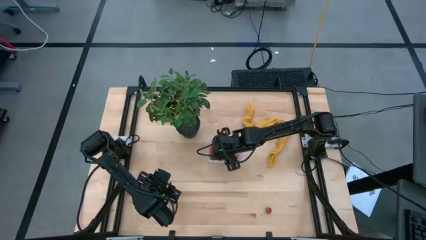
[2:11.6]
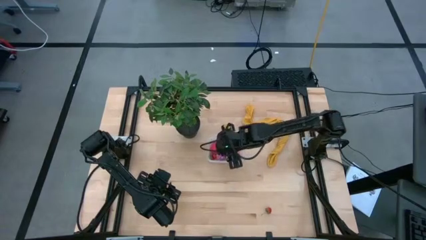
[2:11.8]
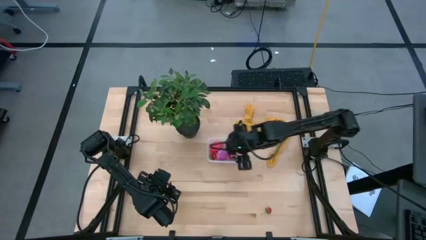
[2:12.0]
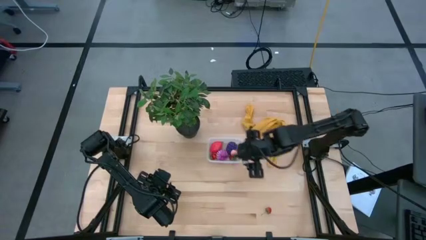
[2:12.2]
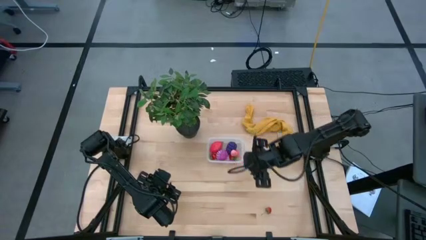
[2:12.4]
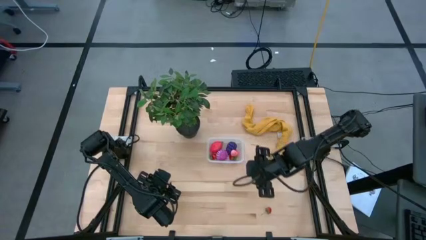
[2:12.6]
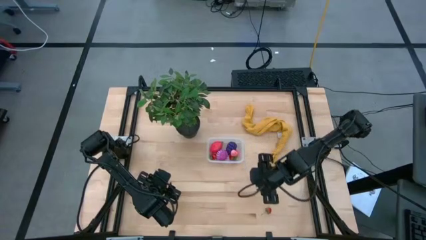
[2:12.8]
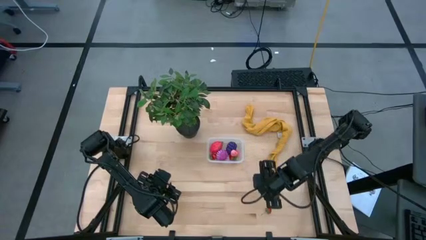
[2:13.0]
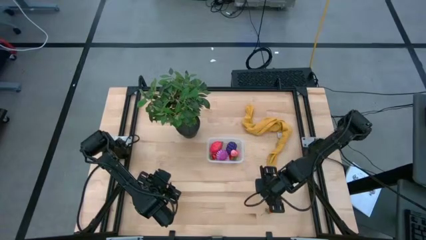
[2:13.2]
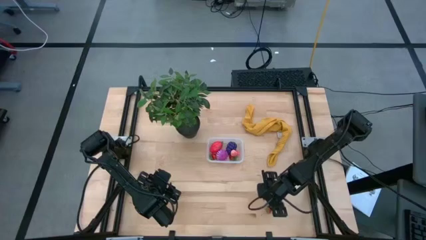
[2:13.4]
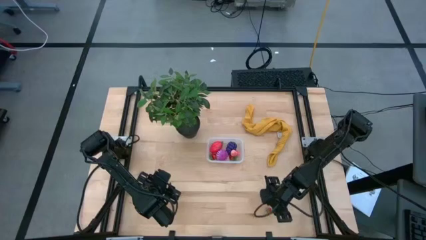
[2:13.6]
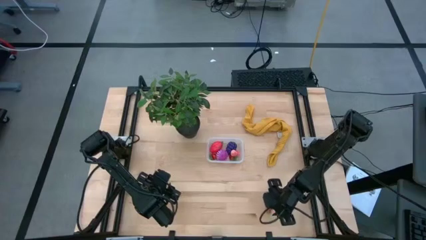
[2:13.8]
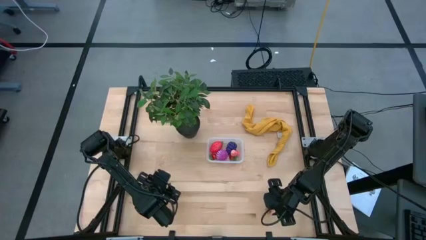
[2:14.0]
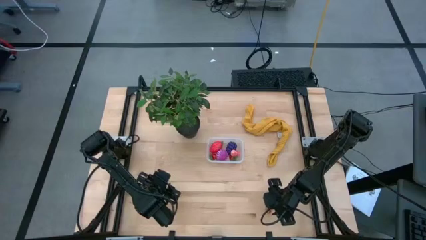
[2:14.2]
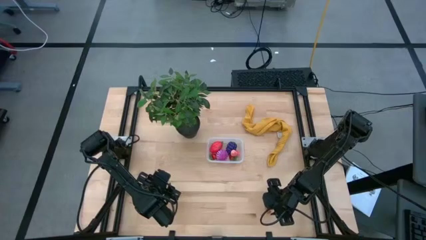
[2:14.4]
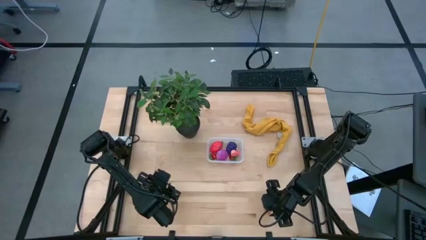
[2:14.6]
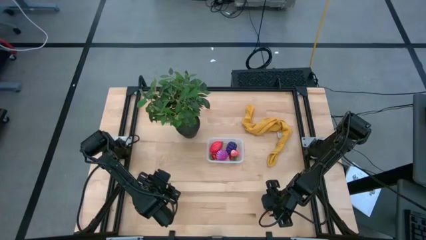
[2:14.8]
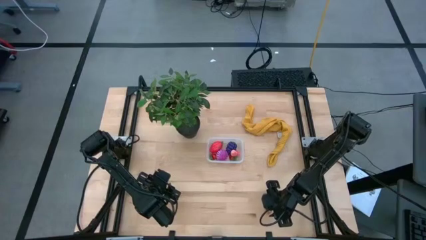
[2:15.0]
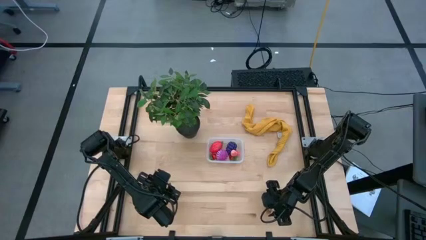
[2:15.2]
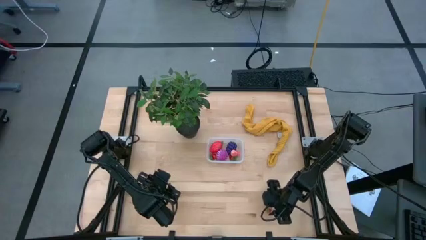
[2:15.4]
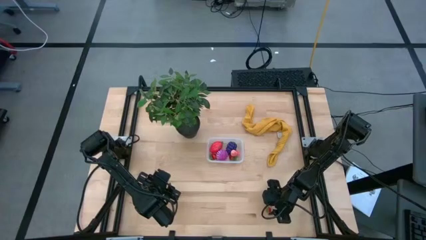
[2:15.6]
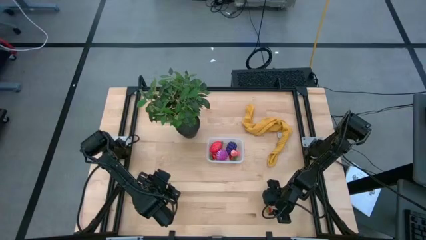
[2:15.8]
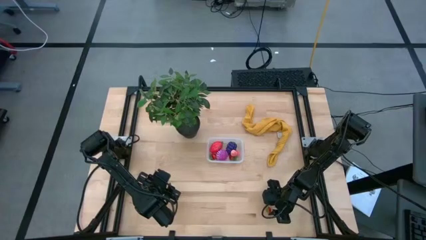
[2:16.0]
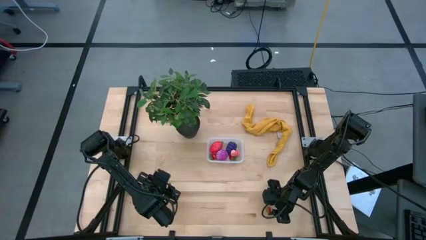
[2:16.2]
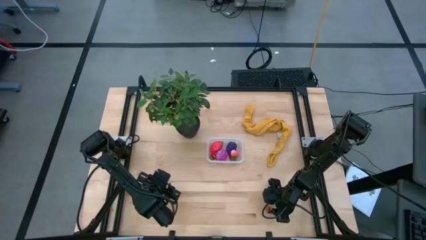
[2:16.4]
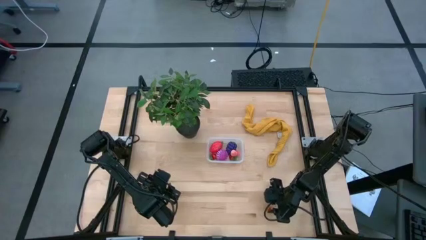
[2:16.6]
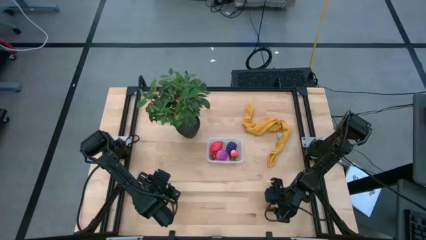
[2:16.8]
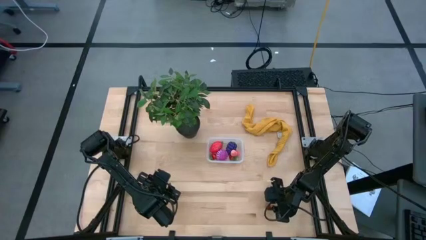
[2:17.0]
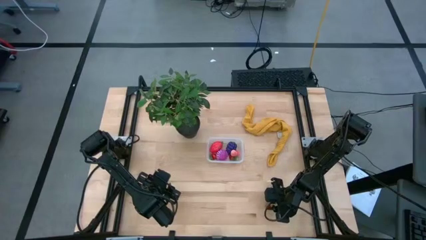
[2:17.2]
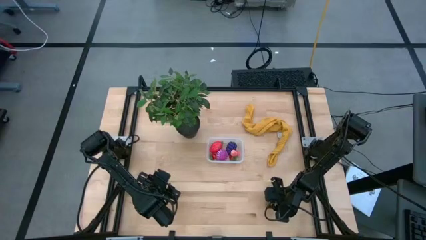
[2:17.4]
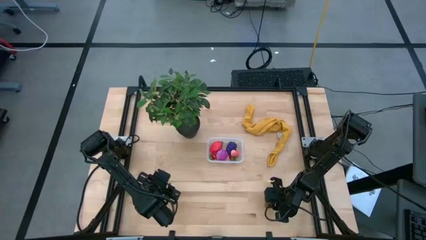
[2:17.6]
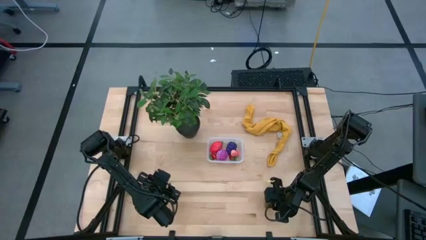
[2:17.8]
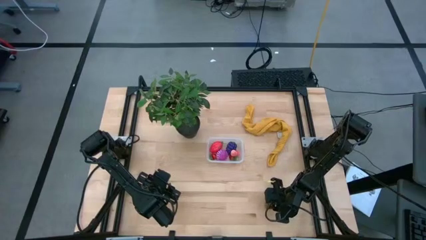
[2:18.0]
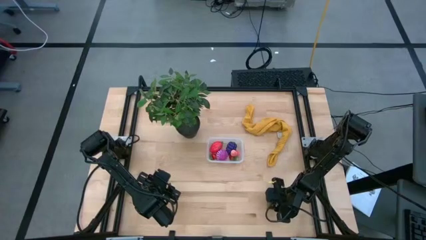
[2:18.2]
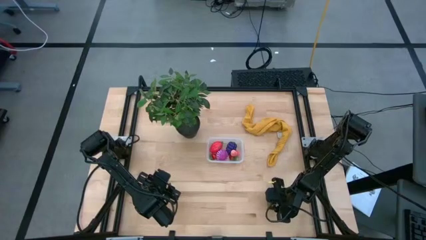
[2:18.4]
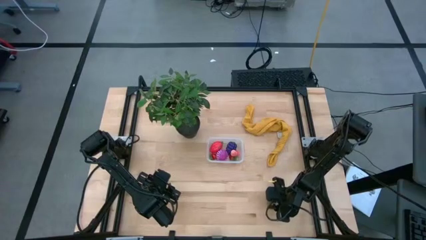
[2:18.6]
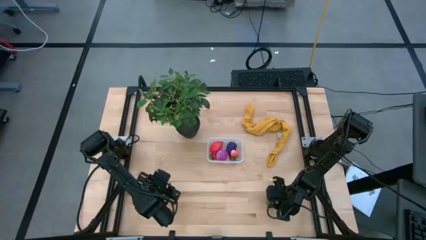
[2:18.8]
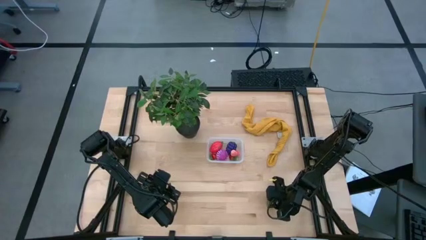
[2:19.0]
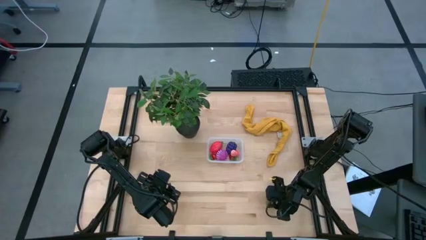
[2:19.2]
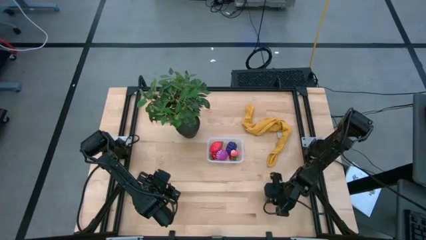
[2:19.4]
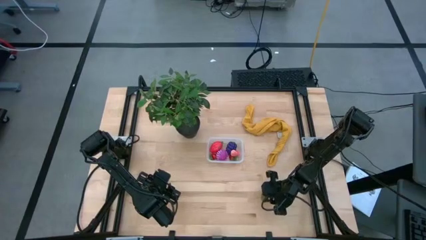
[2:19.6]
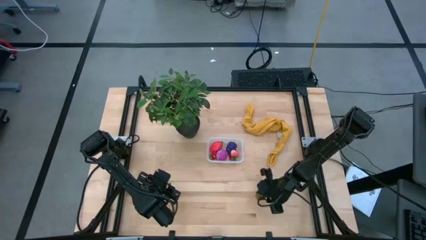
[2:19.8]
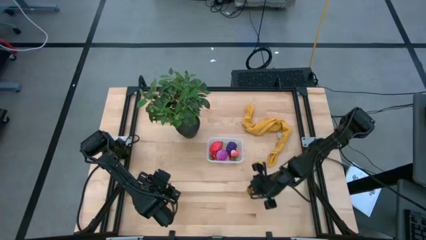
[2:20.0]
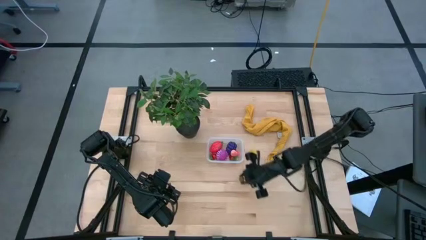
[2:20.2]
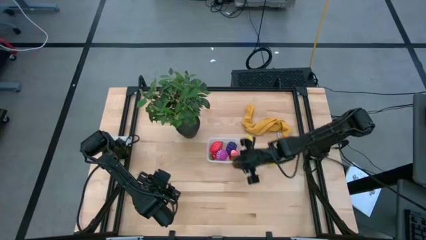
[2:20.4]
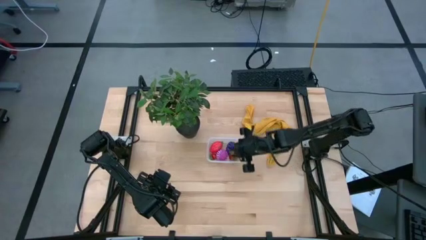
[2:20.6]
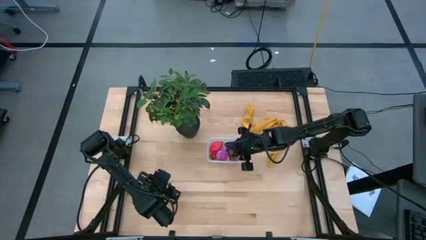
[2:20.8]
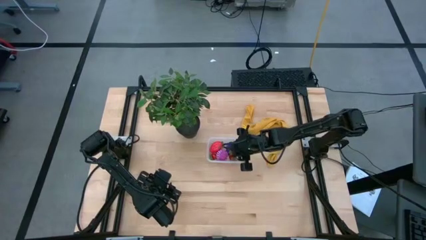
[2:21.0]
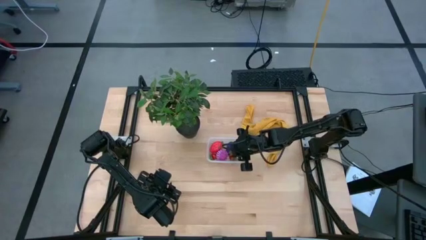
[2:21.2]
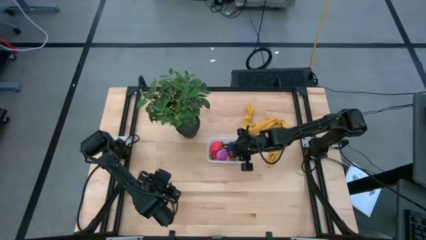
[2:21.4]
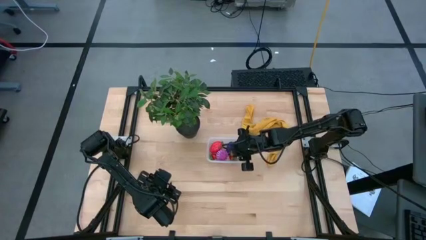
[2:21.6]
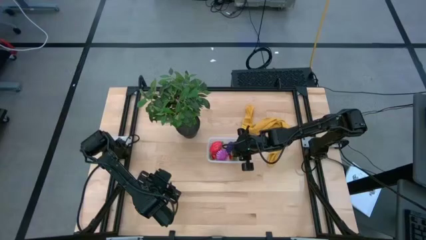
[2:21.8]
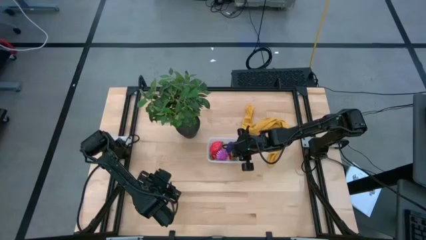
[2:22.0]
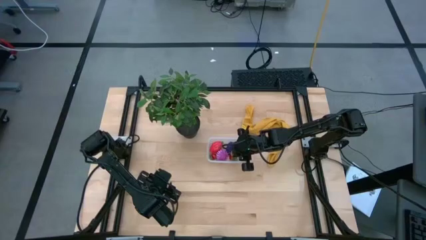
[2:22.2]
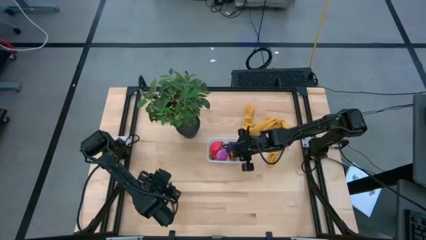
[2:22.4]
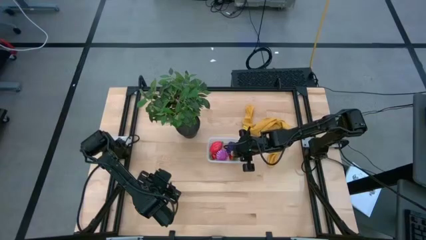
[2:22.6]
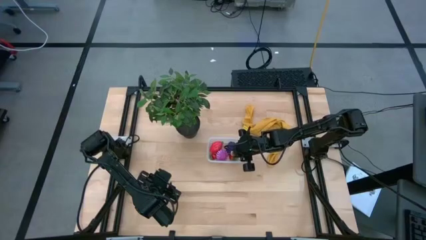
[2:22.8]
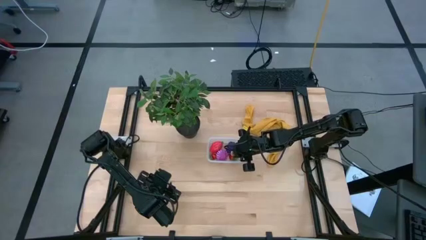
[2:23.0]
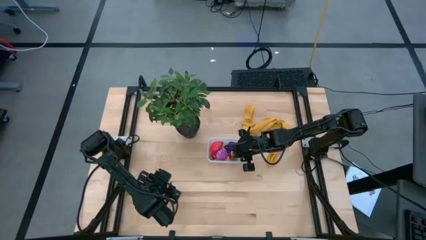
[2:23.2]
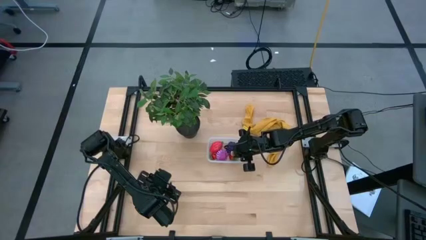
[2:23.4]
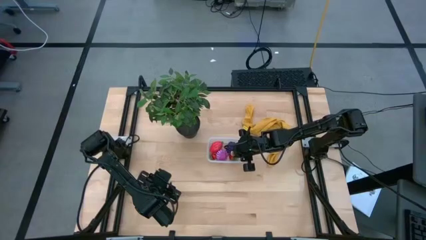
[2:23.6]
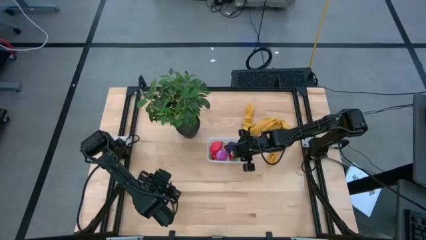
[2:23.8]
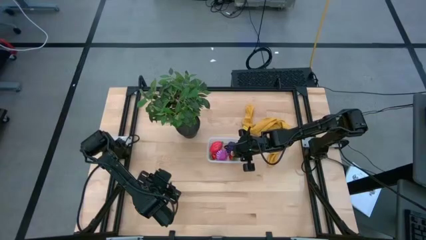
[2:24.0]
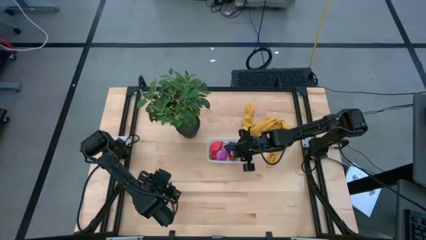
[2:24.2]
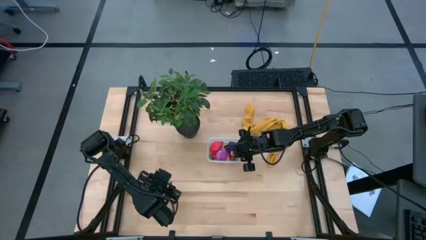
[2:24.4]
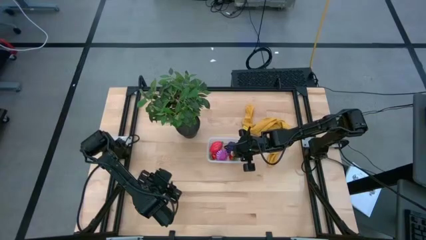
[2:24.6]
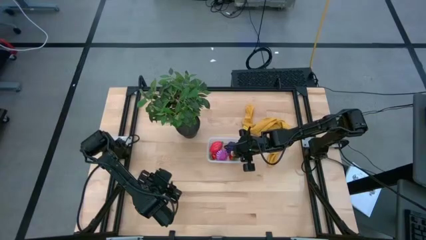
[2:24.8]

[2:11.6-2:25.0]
Task: Pick and placing Produce into tupperware
Put the strawberry into the bin
